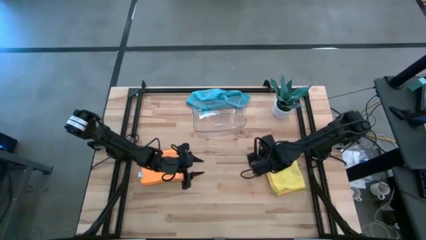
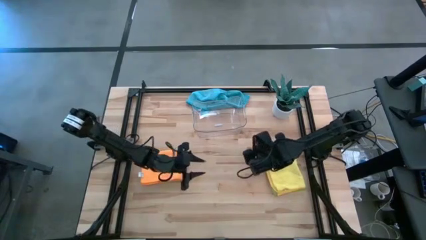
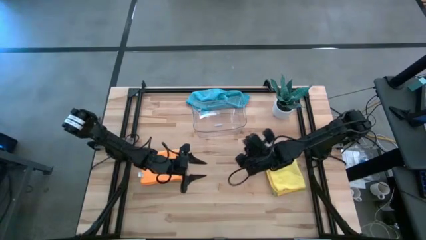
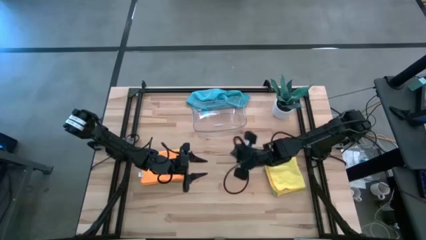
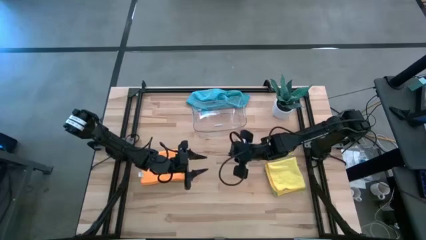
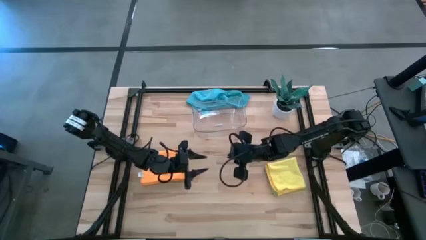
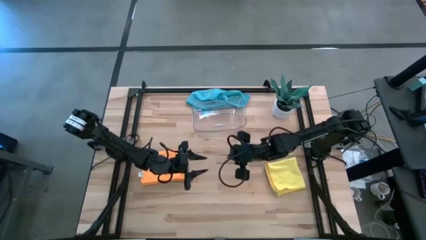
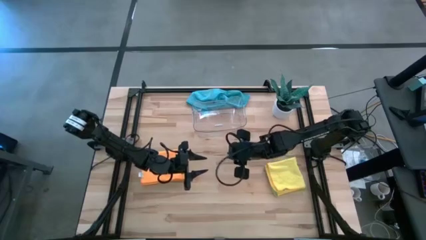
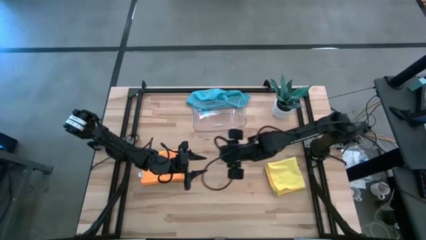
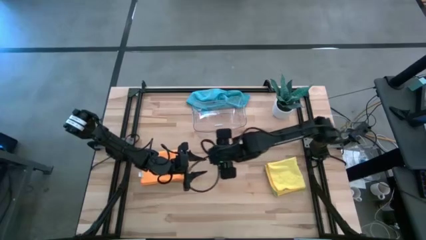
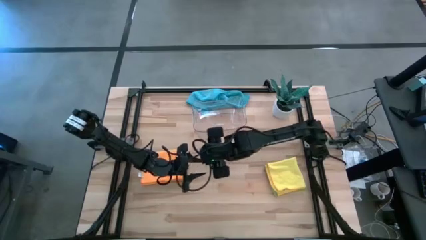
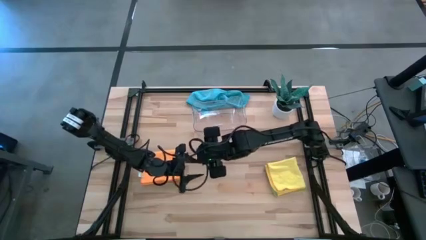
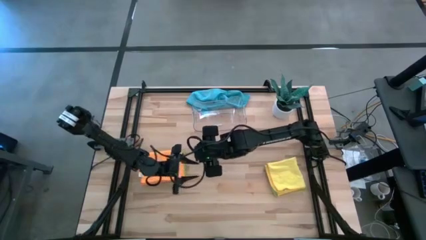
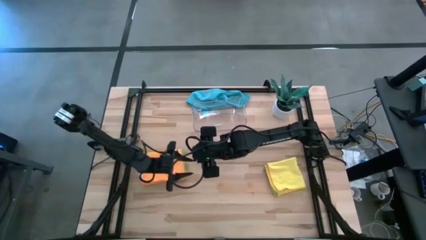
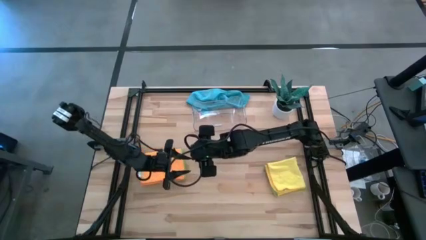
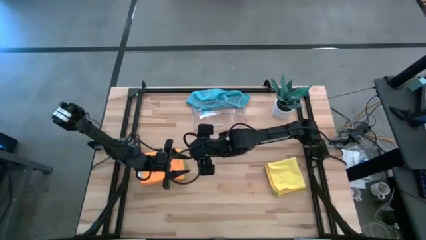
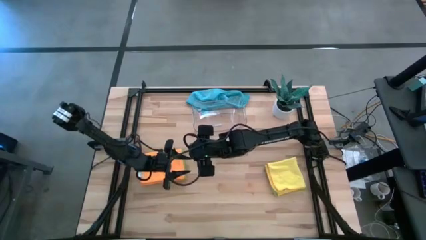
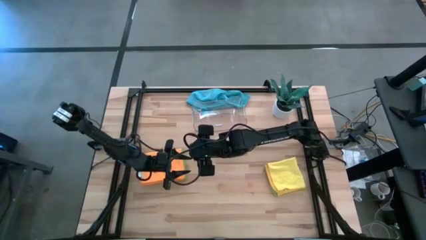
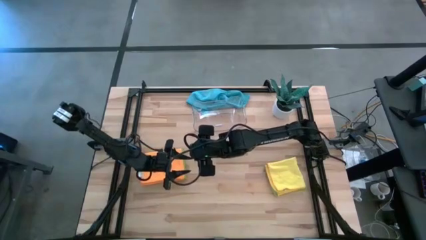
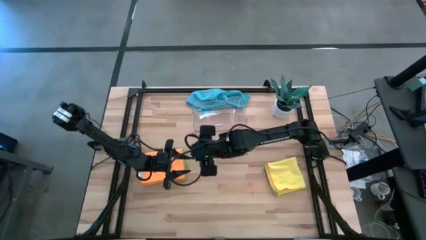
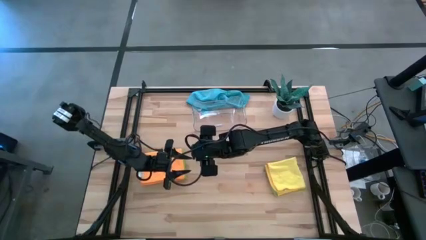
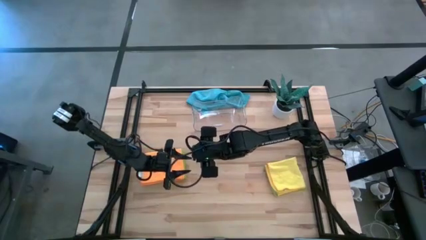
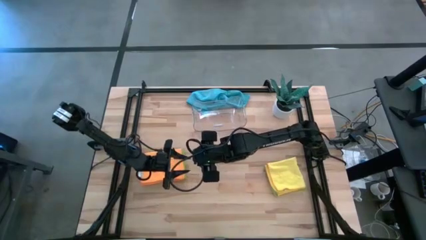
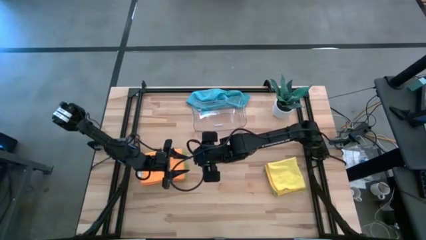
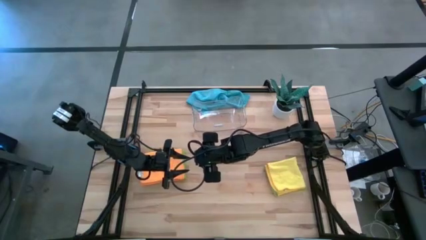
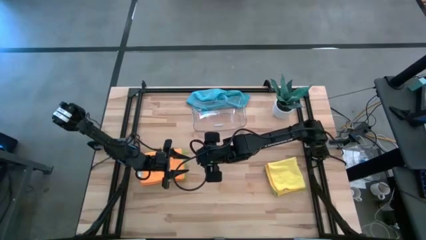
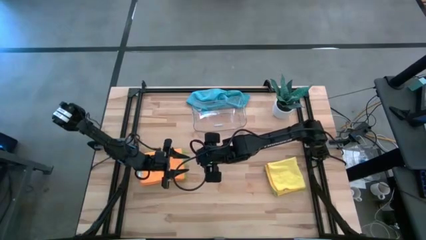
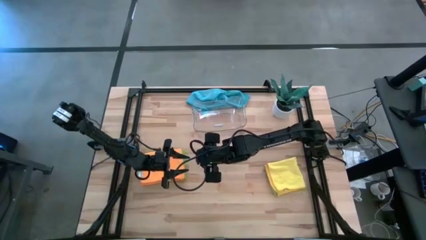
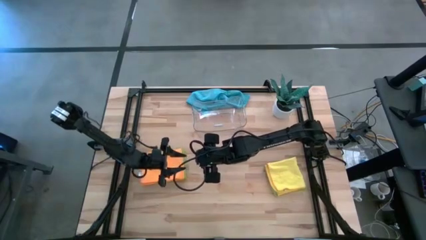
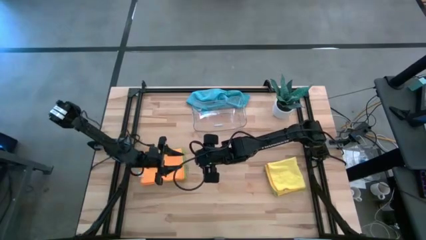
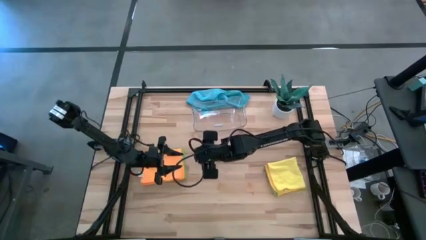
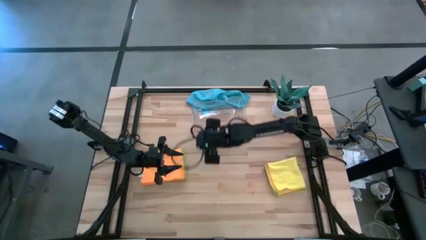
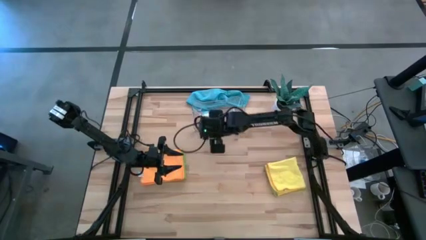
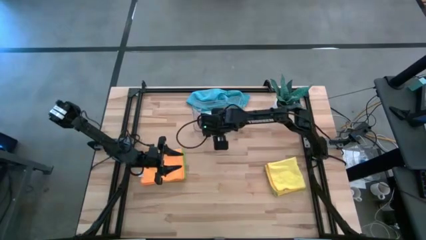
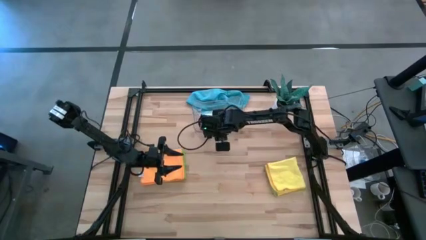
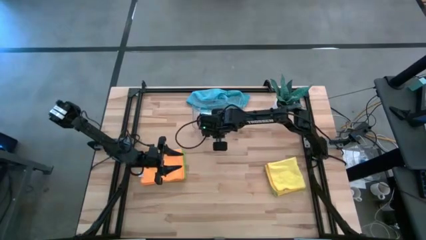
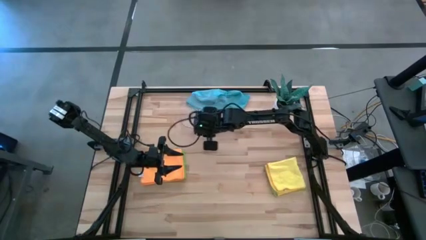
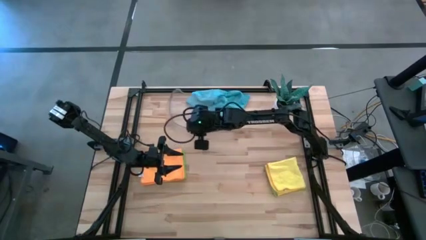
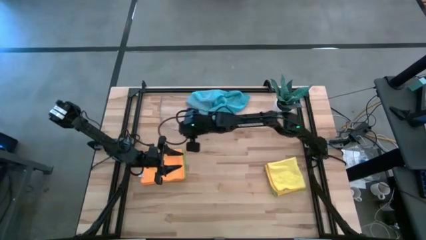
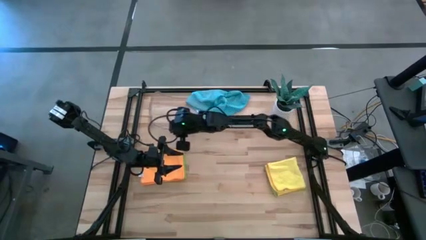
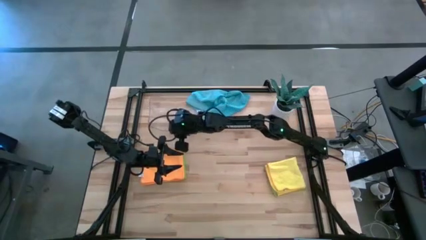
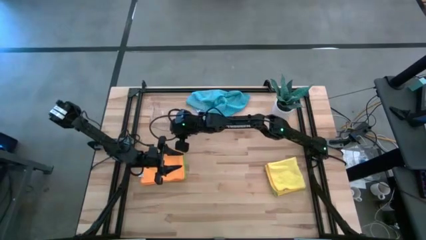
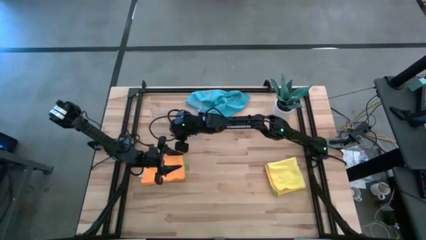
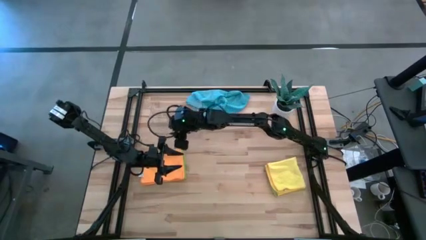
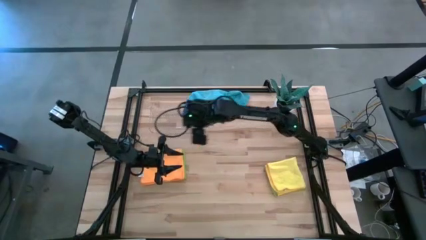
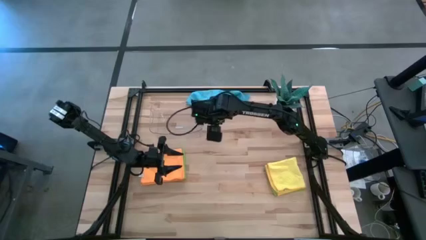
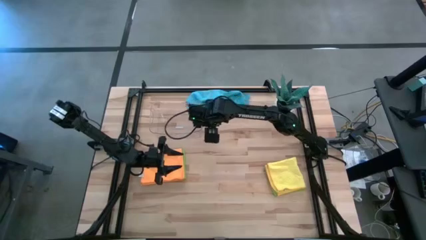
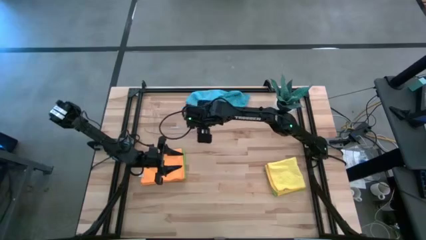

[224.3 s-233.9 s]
Task: Fold microfiber towels
Move the transparent bin to the top left of the table

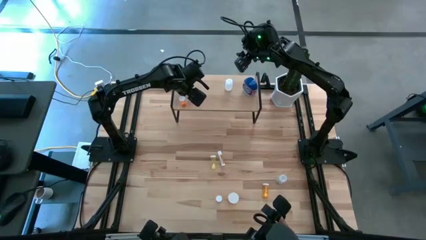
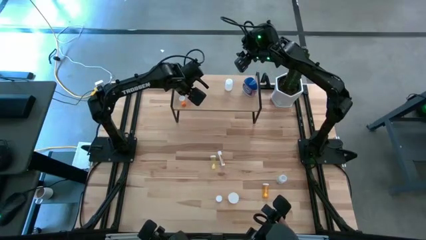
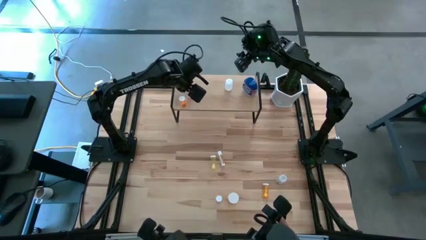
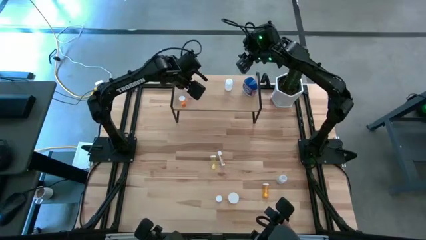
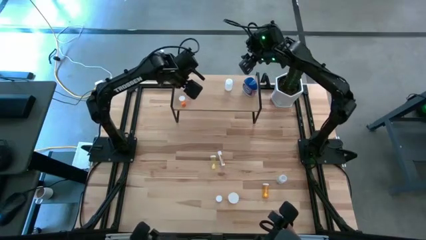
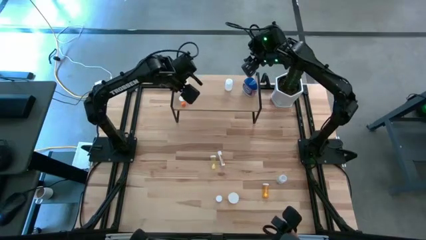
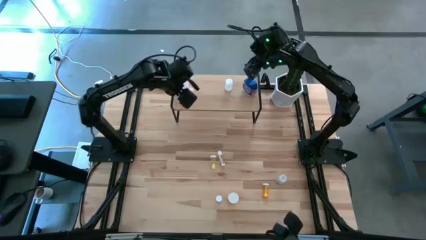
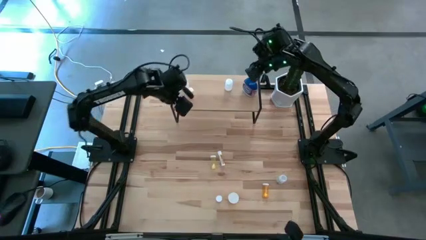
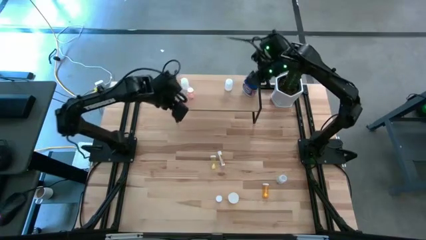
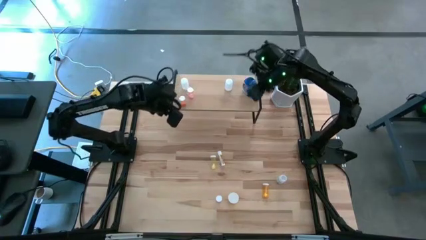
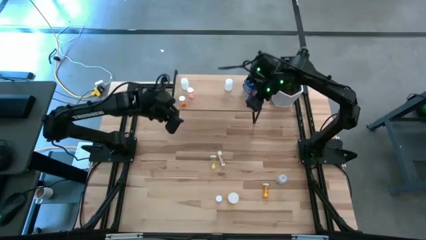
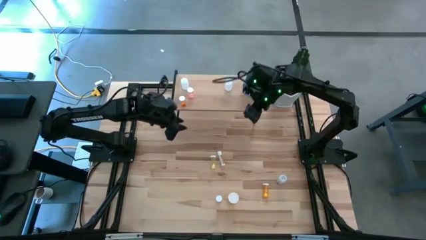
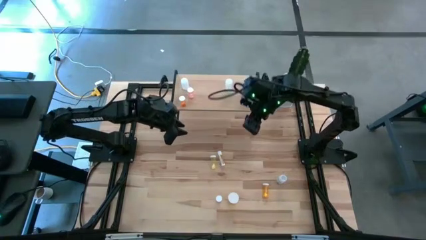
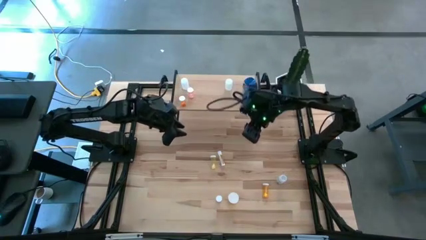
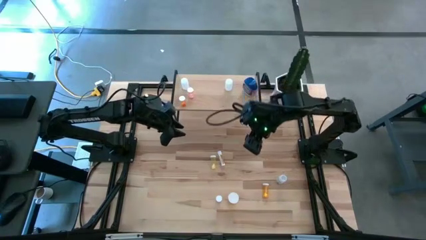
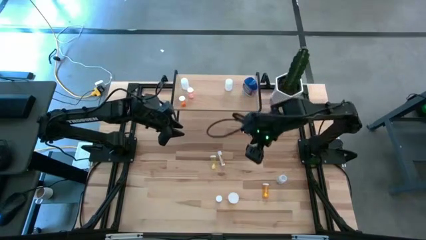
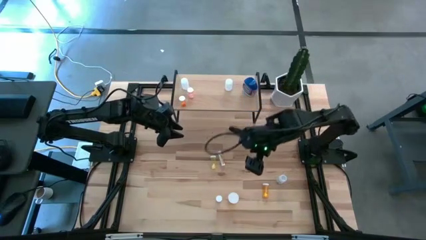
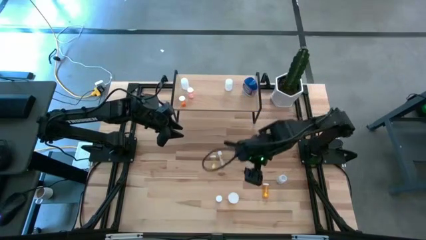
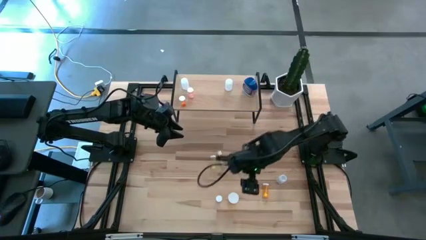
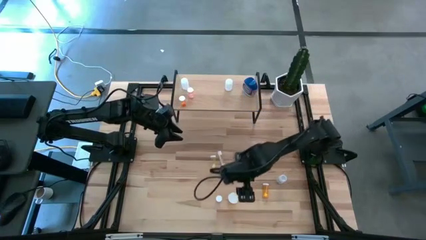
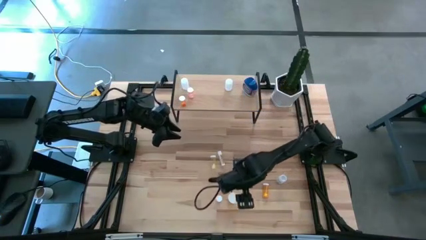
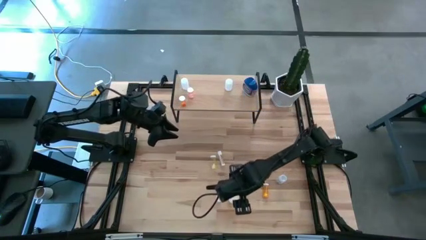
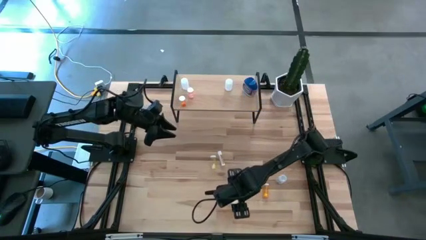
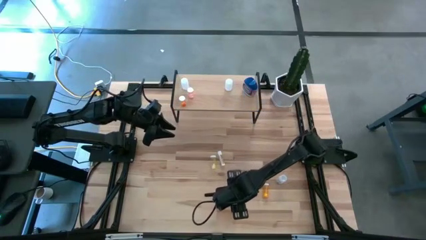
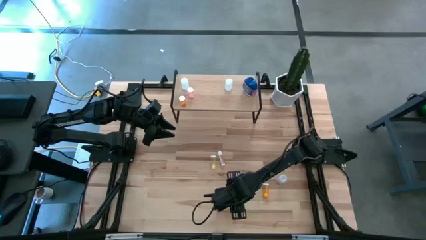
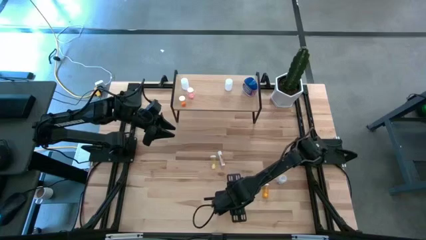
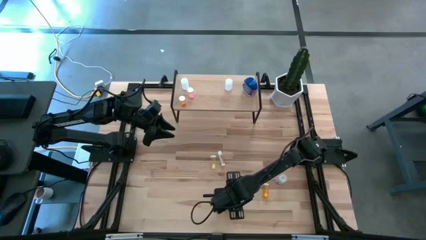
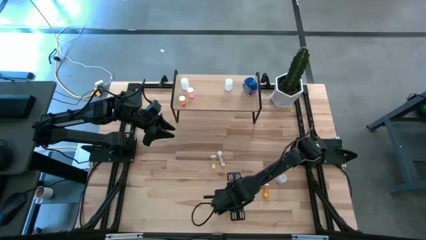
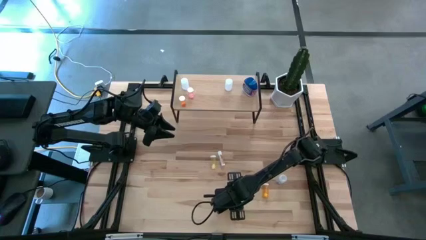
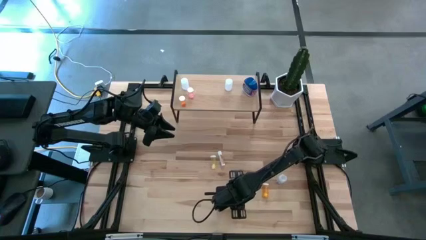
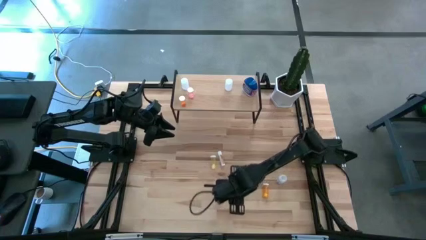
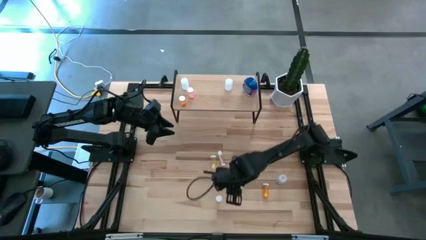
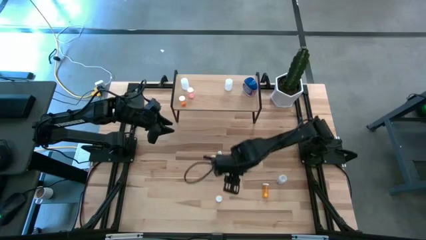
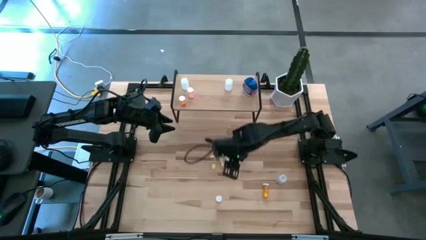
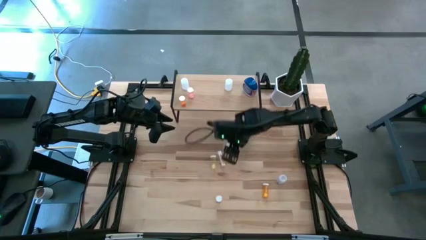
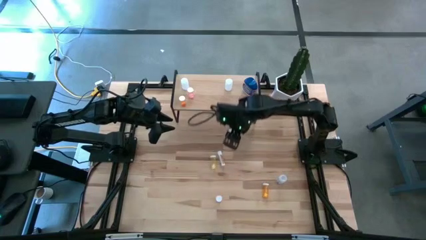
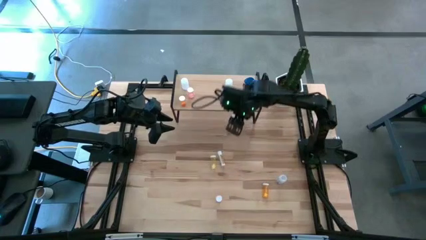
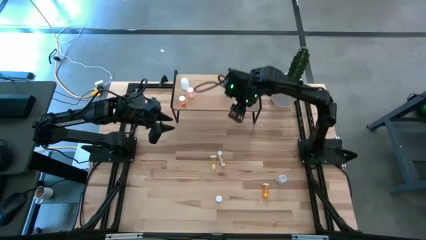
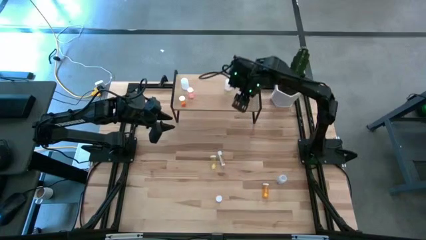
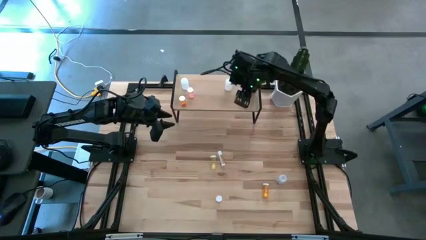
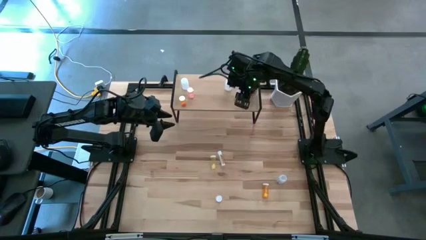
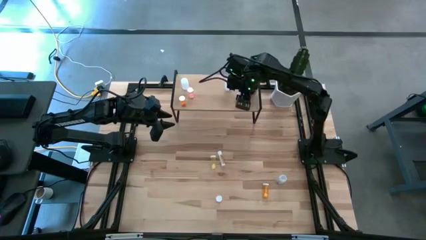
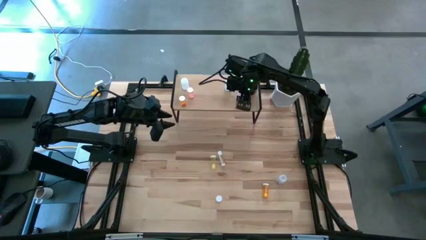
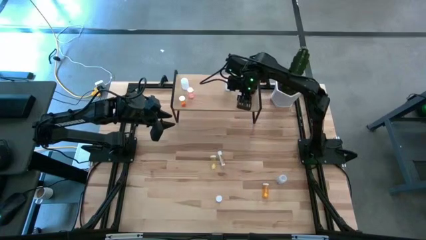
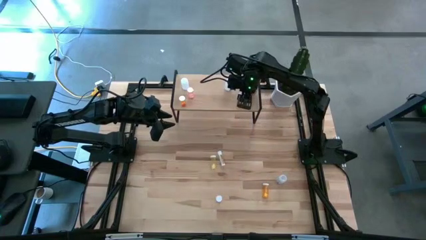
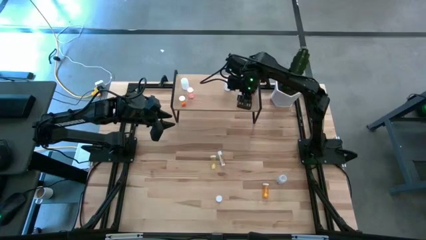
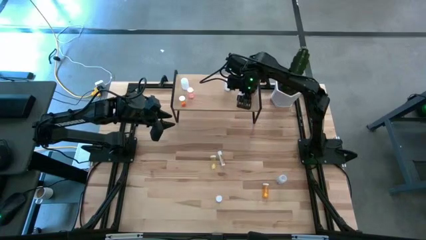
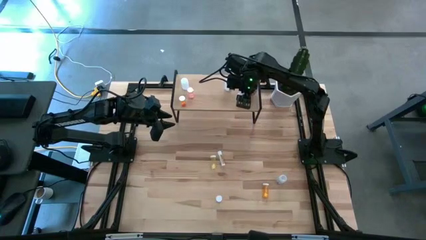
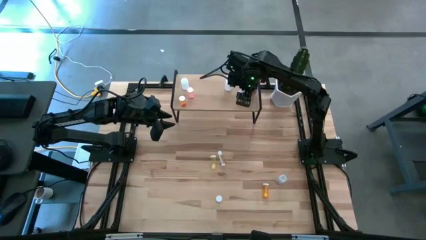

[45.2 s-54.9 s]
Task: Pick and place medicine bottles onto shelf by color
Put the left orange pill bottle on the shelf
